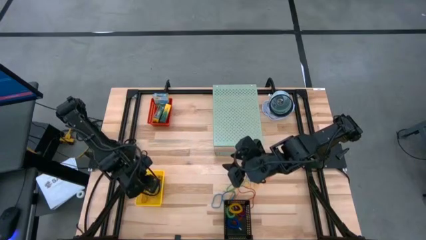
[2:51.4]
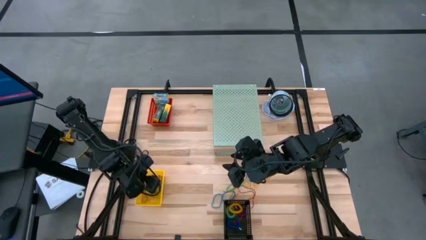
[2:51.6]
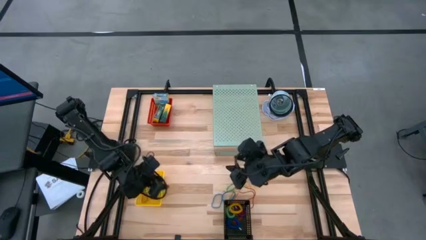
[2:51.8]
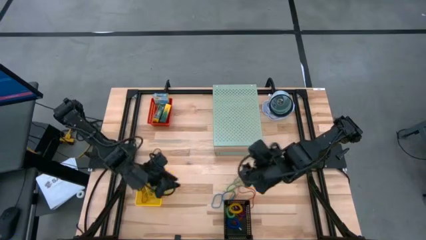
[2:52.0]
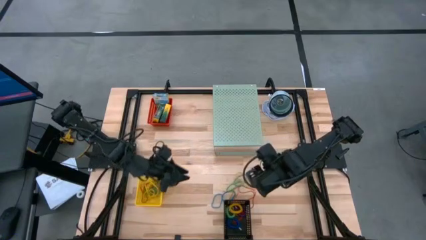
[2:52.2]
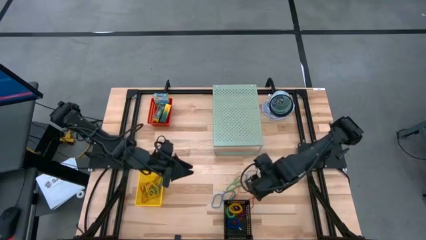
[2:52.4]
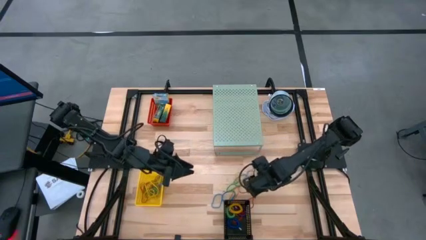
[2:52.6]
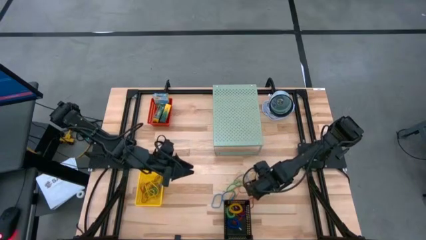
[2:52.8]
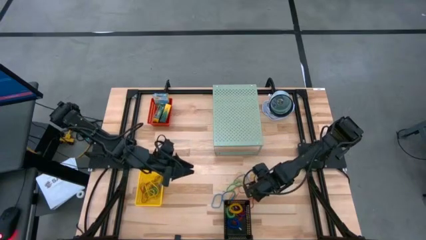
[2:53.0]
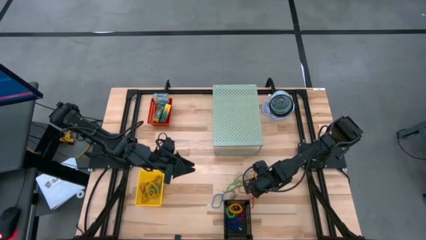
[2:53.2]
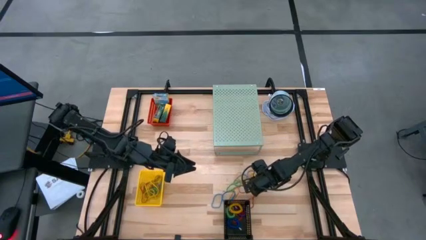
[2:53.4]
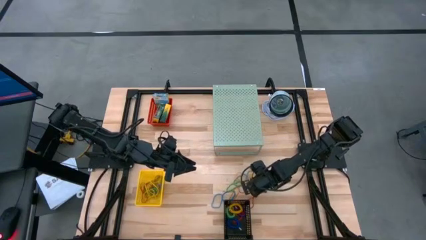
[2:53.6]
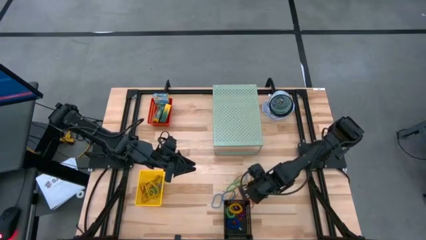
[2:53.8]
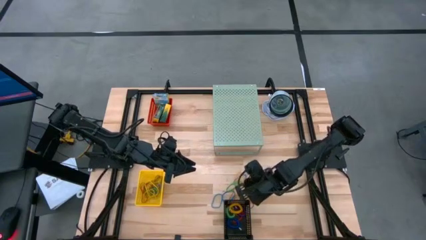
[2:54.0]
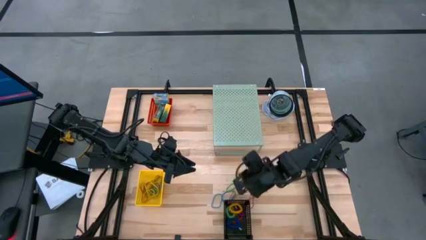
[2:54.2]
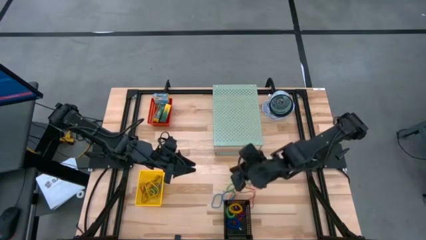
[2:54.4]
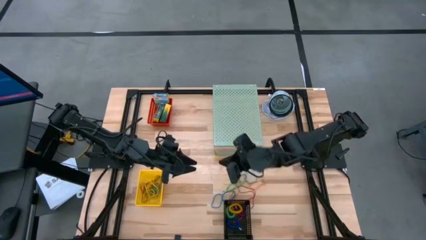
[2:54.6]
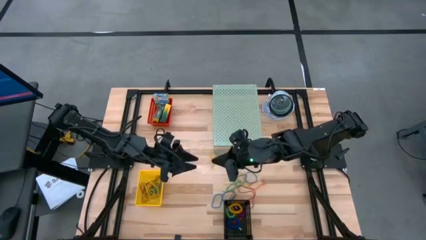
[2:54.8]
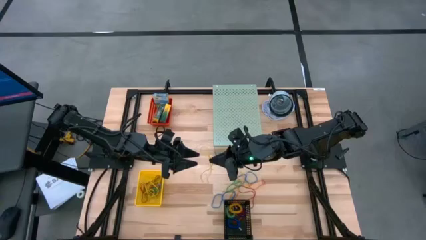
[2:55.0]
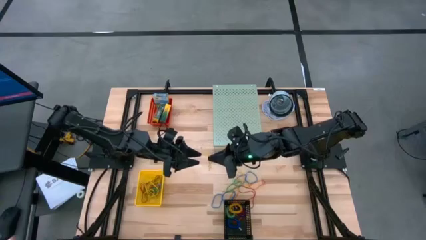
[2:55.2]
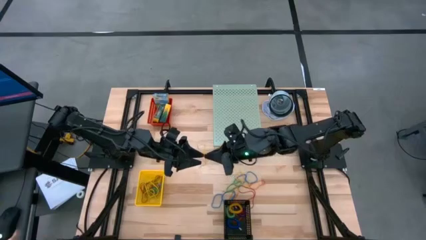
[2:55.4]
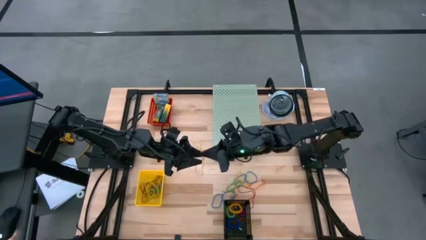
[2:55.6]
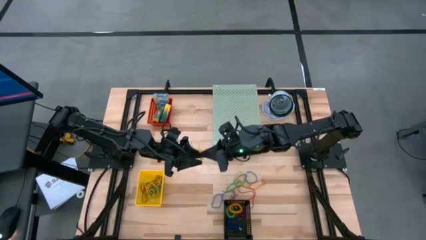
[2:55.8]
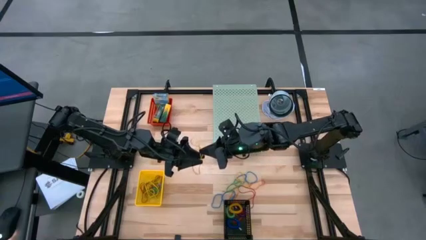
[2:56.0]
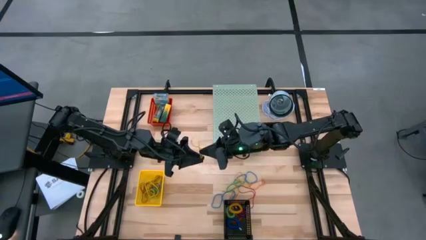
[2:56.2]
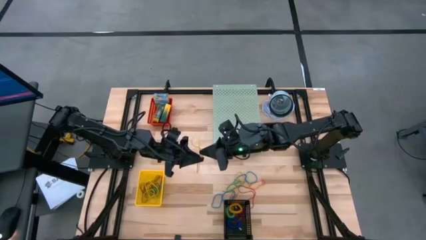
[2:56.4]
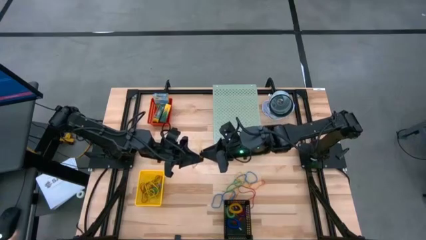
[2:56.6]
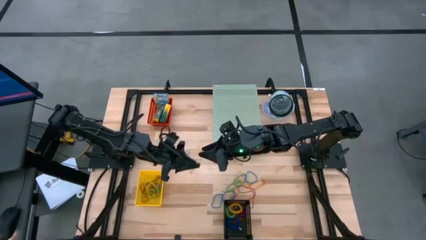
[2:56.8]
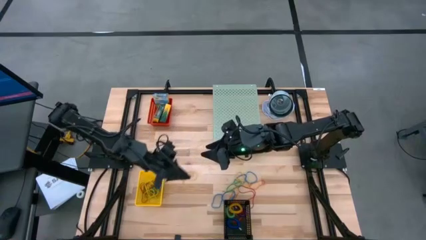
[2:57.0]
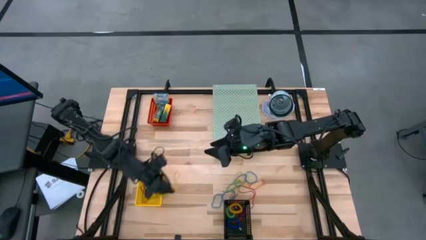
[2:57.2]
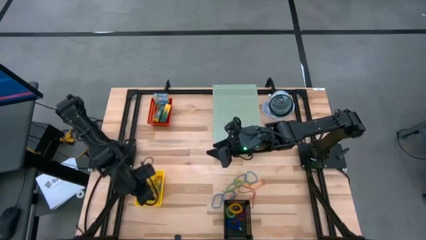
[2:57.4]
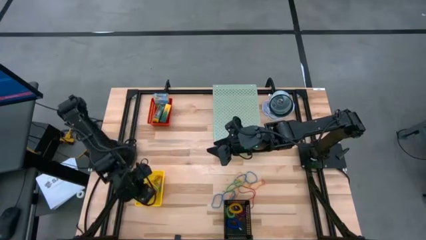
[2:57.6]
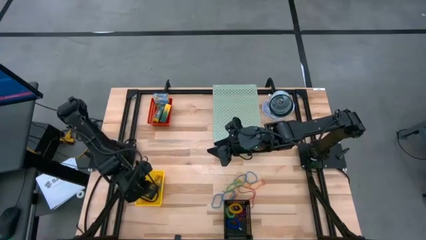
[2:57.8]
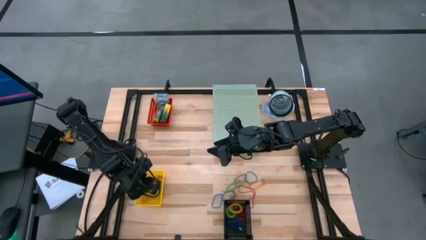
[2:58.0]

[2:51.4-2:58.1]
Task: Pick & Place Office Desk Supplies
Put the yellow rubber band into the yellow bin

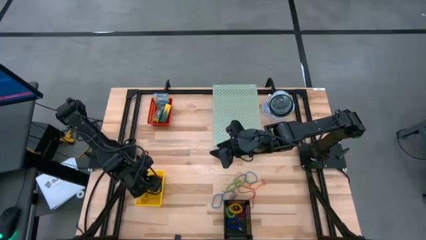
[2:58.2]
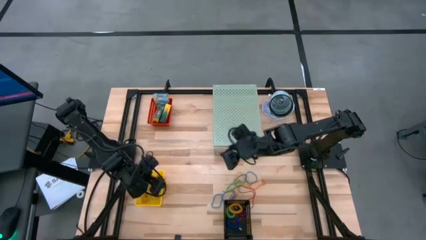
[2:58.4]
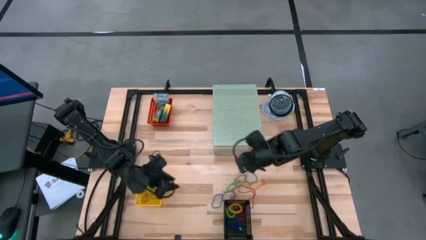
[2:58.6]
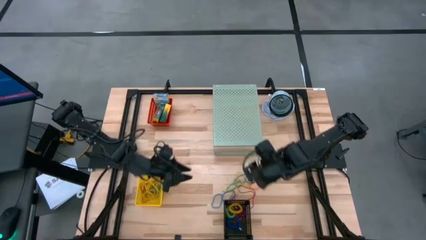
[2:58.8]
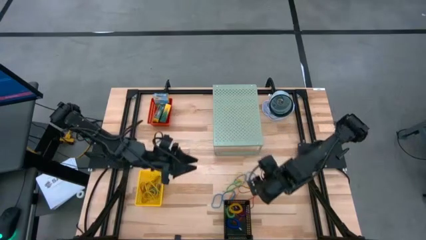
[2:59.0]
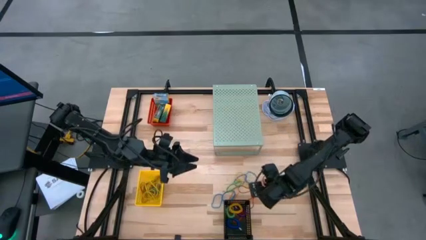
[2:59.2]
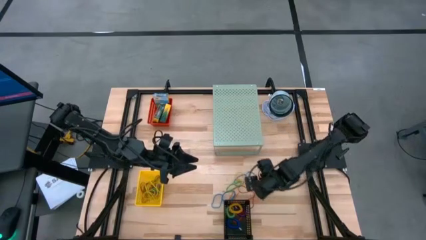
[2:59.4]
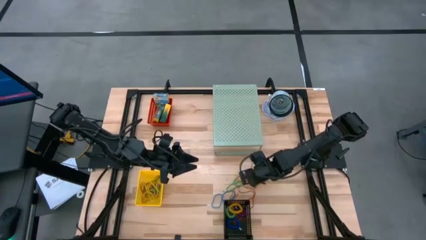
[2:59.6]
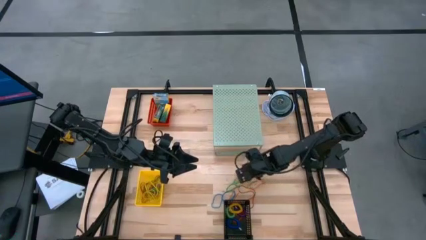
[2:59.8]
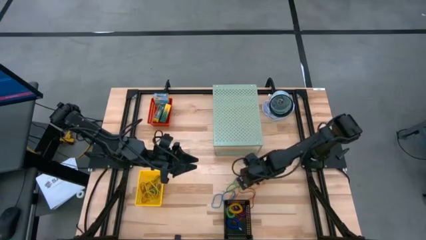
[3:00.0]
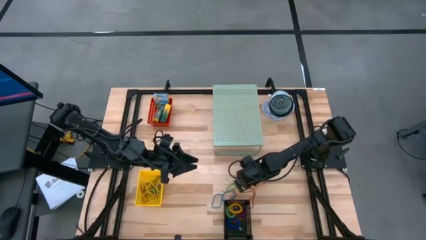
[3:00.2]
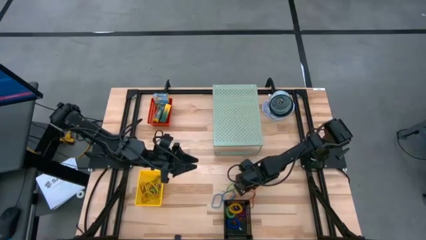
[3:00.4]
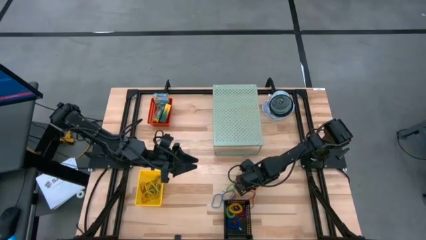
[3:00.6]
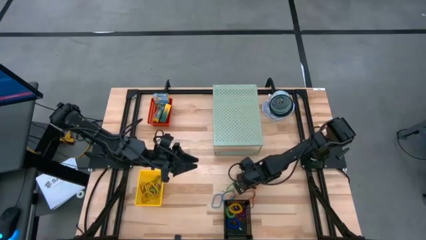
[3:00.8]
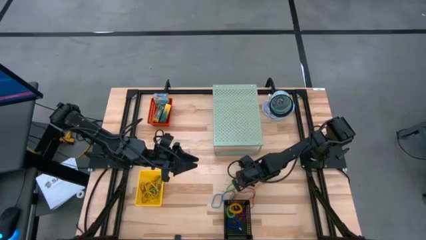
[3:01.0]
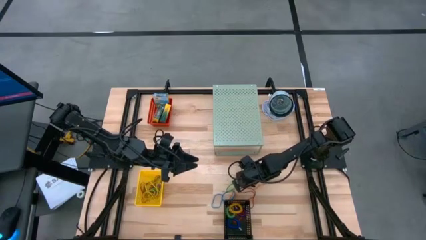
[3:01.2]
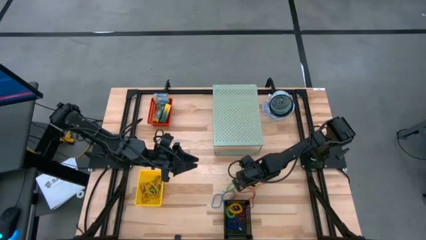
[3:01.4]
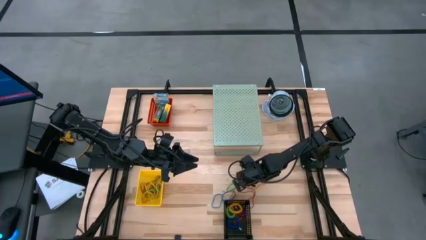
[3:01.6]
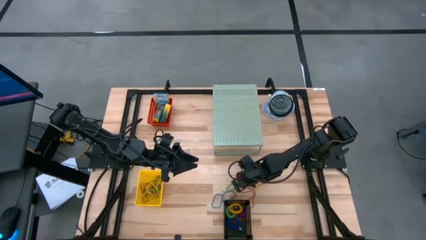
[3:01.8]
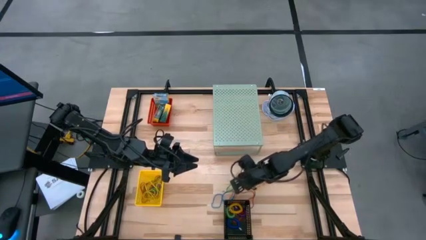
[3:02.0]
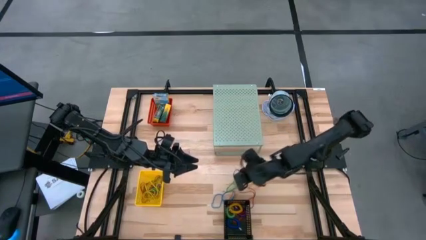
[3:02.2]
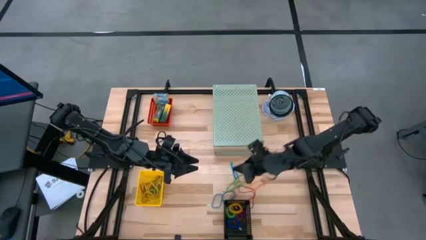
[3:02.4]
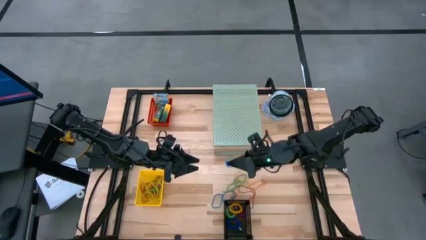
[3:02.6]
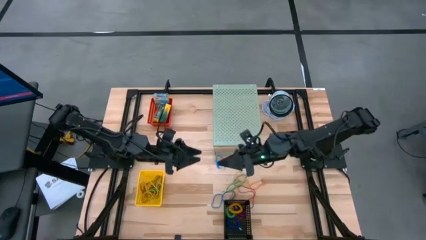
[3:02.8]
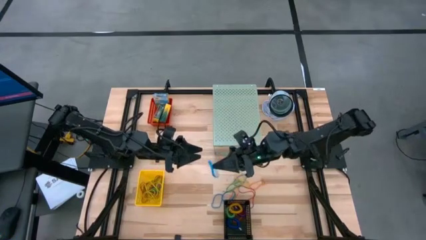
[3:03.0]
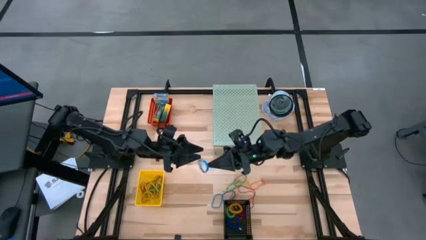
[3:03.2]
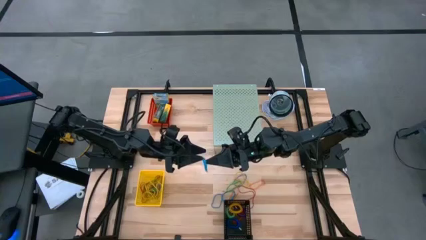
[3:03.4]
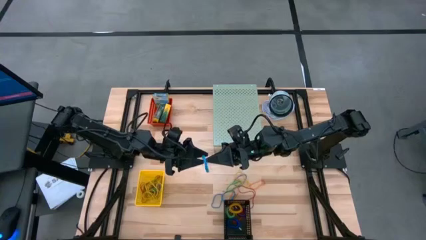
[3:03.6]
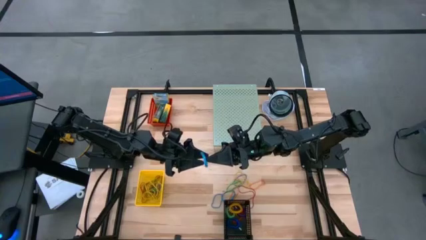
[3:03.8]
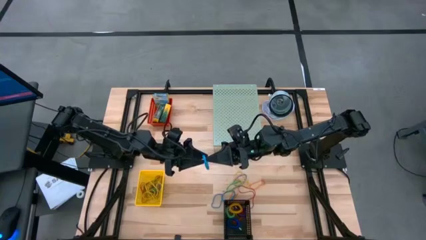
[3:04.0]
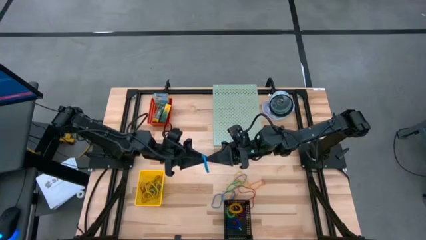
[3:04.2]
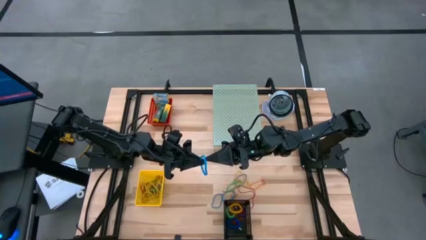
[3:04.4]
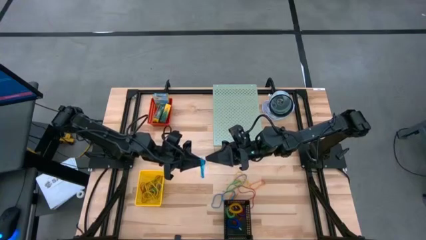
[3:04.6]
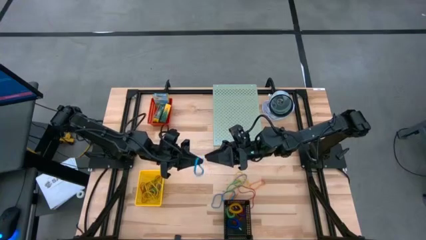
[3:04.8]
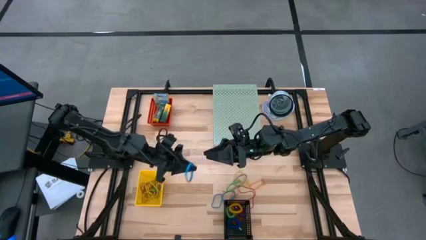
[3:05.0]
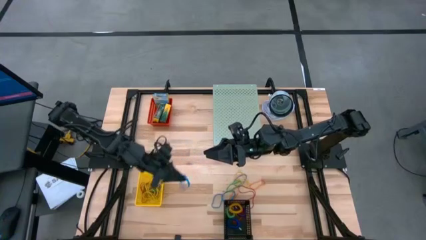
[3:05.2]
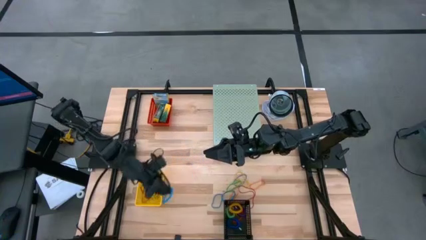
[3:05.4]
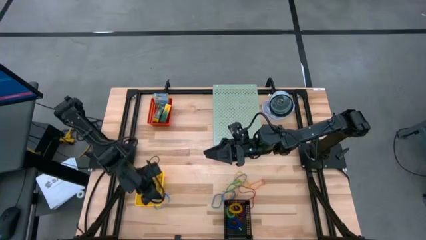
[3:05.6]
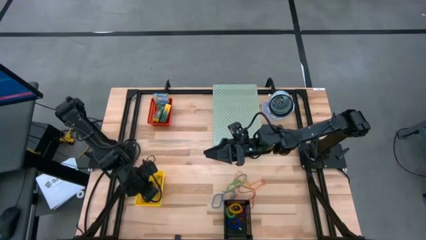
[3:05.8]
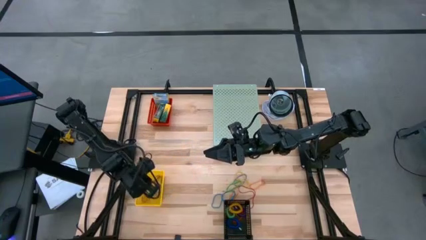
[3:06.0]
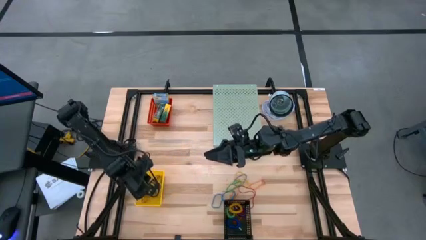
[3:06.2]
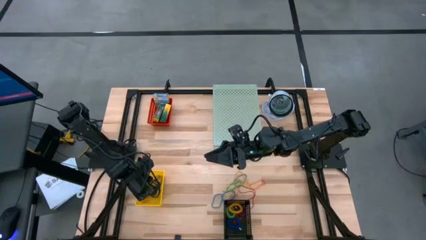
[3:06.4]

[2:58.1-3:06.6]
Put the blue rubber band into the yellow bin
